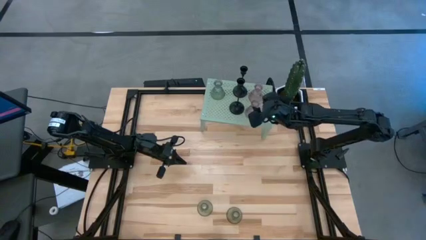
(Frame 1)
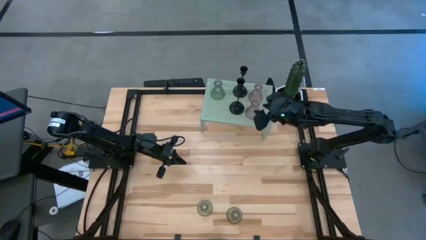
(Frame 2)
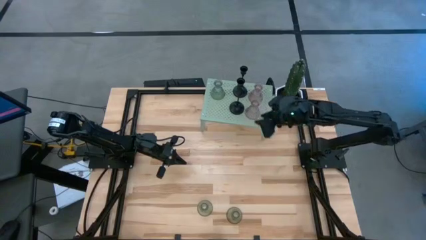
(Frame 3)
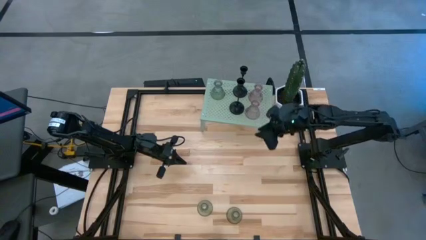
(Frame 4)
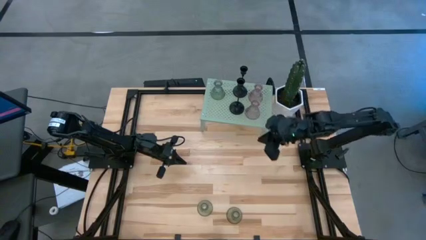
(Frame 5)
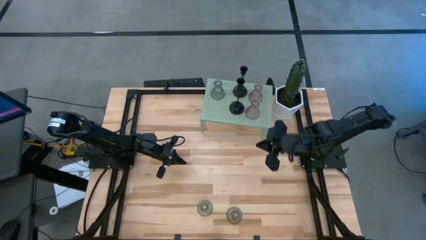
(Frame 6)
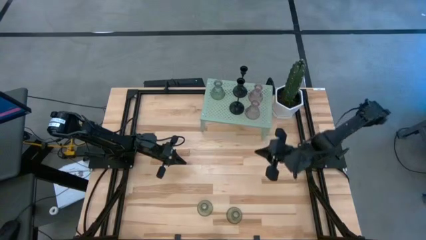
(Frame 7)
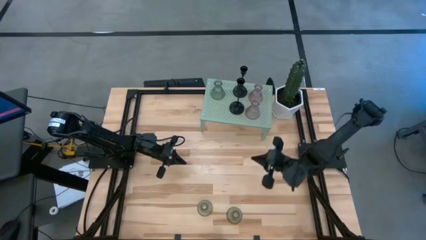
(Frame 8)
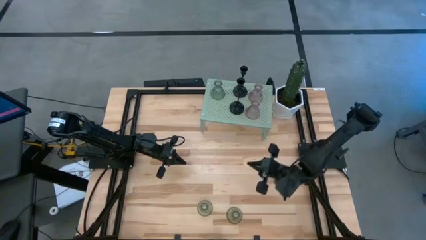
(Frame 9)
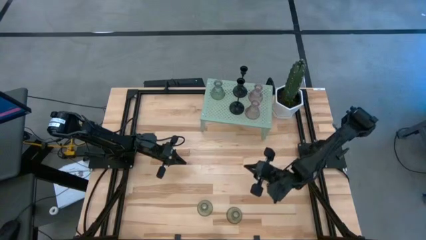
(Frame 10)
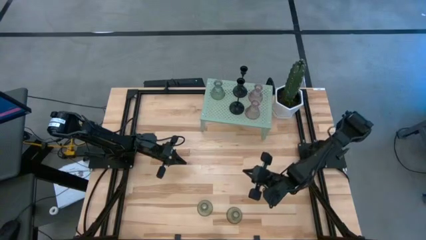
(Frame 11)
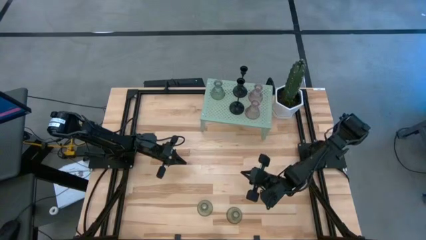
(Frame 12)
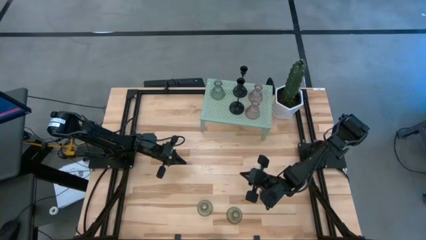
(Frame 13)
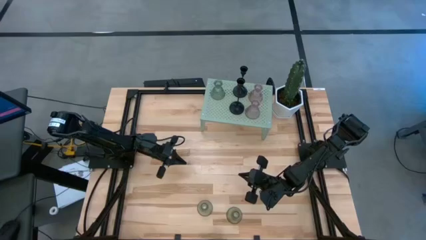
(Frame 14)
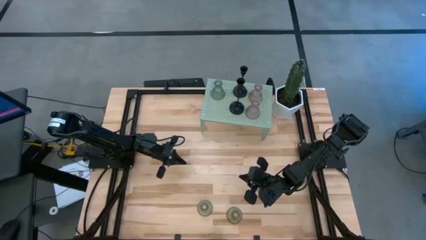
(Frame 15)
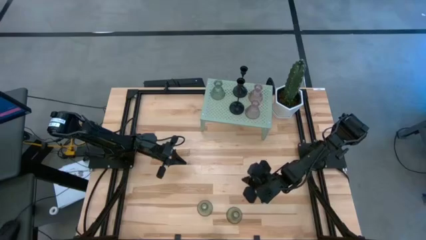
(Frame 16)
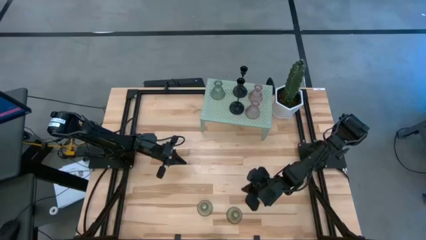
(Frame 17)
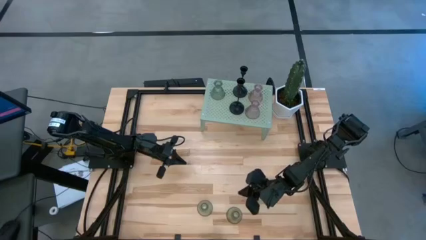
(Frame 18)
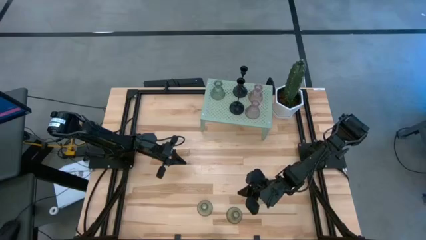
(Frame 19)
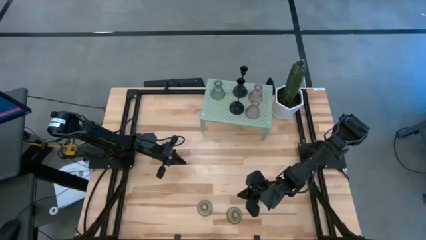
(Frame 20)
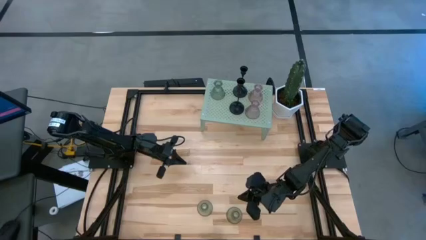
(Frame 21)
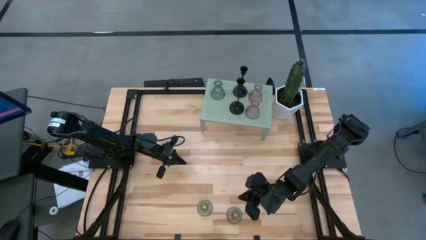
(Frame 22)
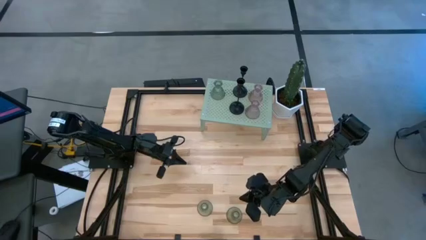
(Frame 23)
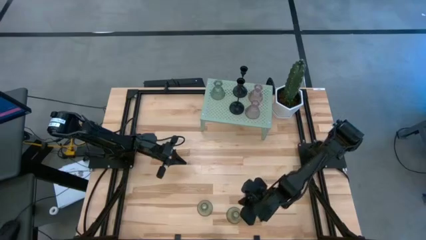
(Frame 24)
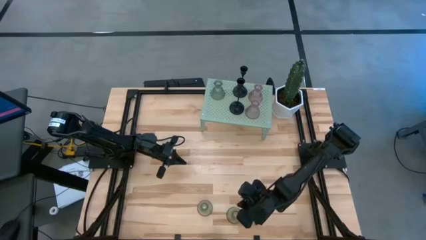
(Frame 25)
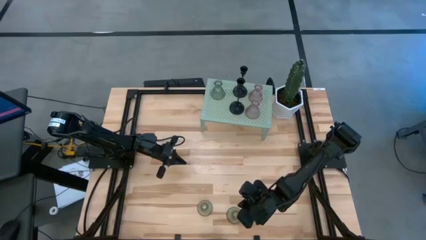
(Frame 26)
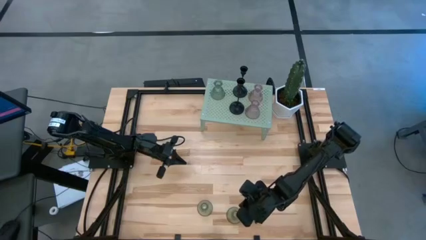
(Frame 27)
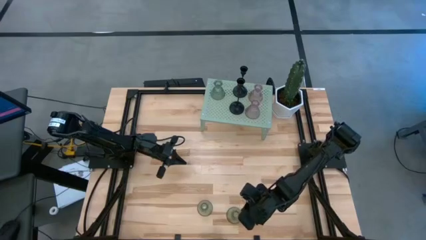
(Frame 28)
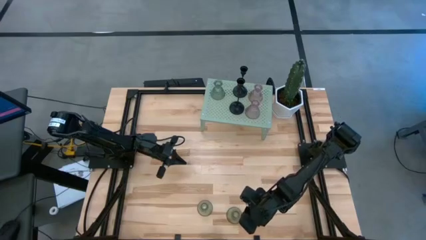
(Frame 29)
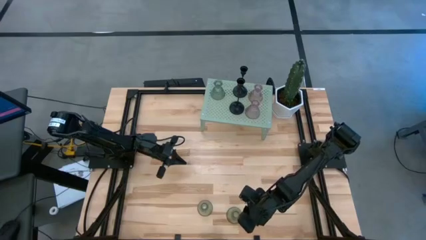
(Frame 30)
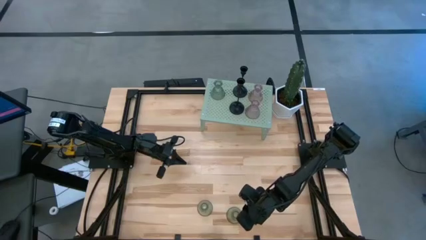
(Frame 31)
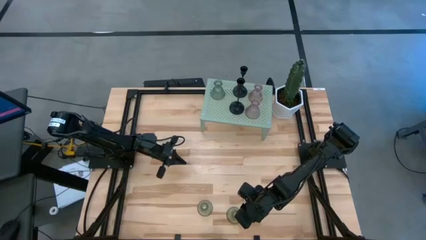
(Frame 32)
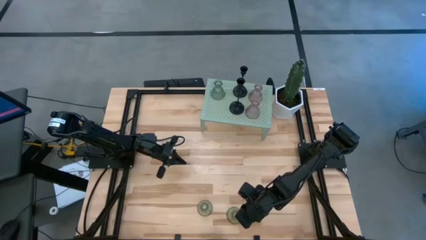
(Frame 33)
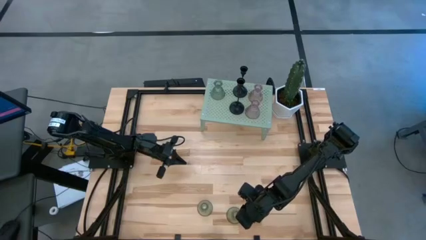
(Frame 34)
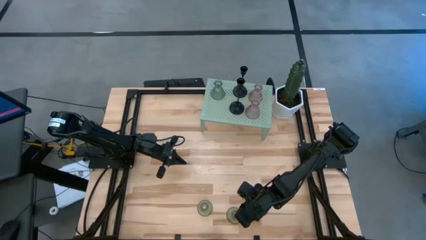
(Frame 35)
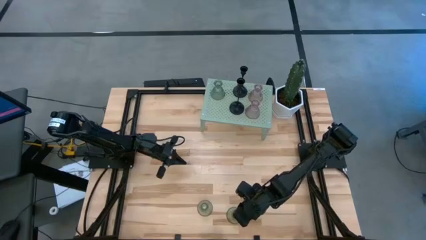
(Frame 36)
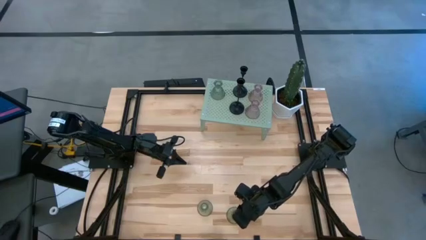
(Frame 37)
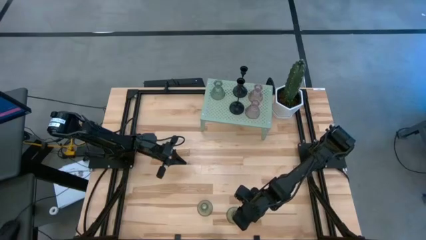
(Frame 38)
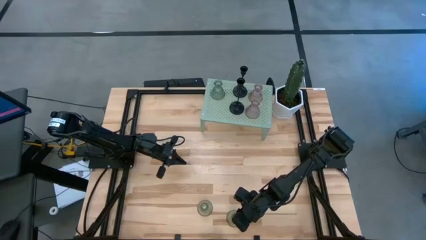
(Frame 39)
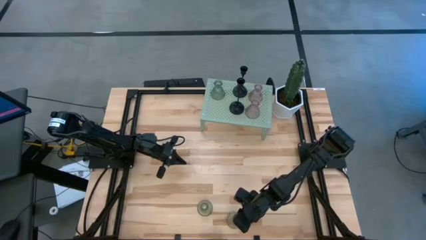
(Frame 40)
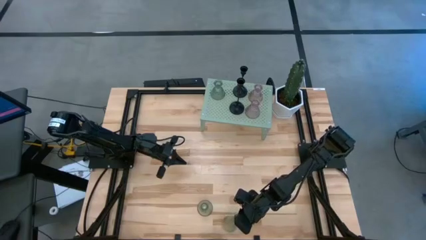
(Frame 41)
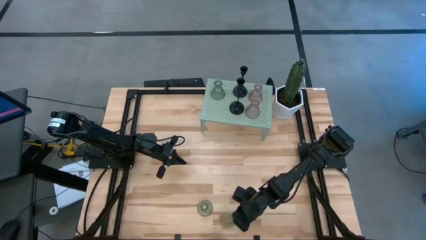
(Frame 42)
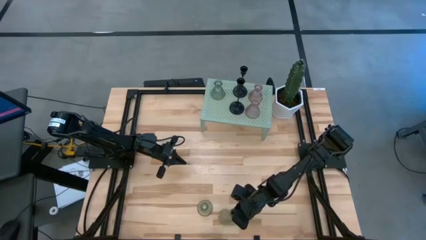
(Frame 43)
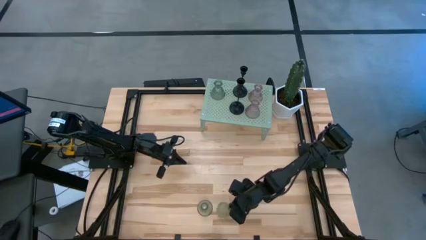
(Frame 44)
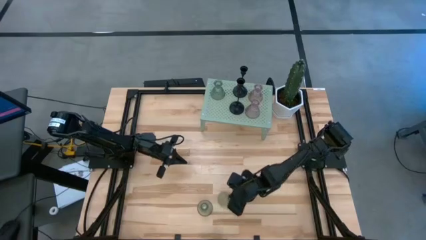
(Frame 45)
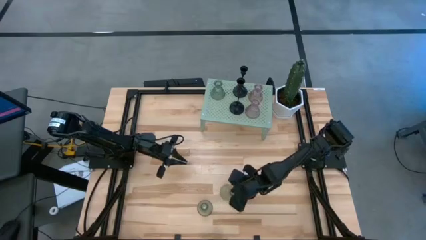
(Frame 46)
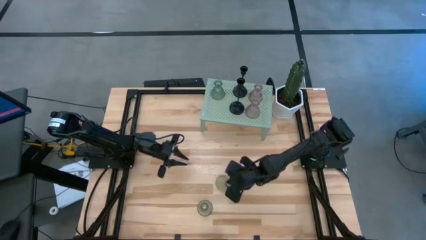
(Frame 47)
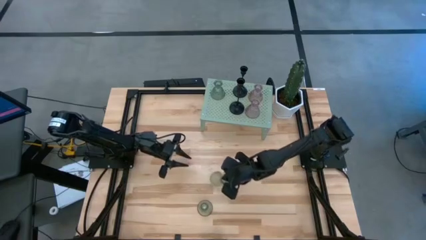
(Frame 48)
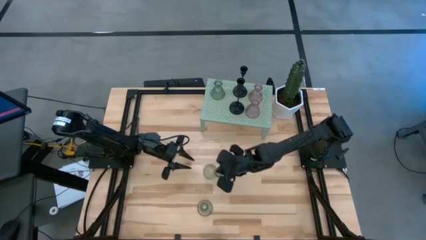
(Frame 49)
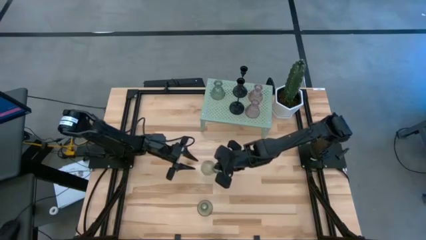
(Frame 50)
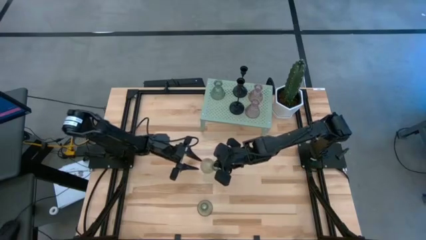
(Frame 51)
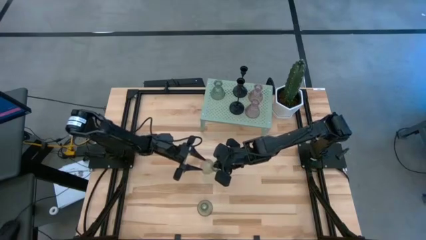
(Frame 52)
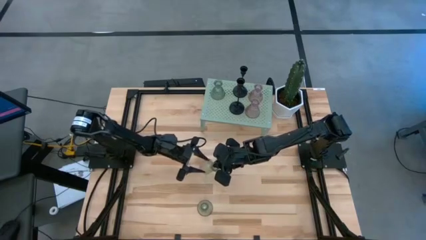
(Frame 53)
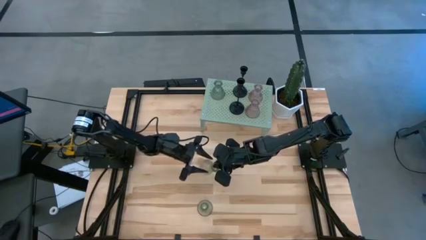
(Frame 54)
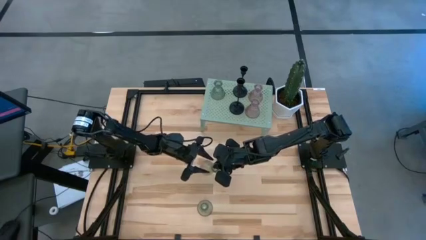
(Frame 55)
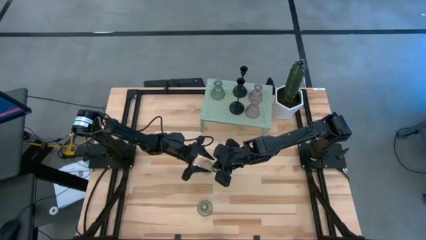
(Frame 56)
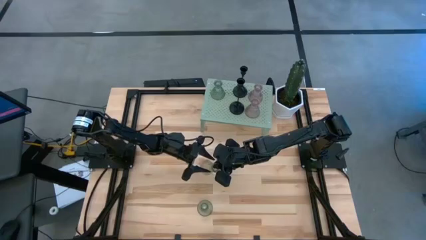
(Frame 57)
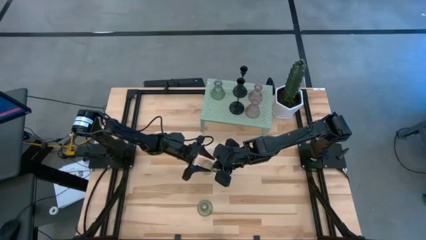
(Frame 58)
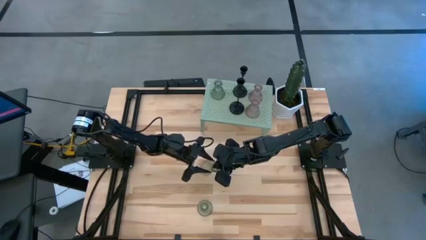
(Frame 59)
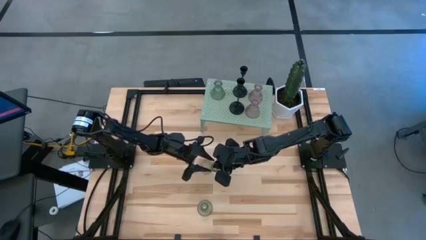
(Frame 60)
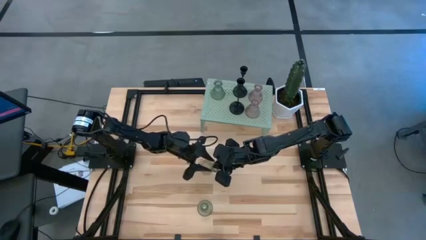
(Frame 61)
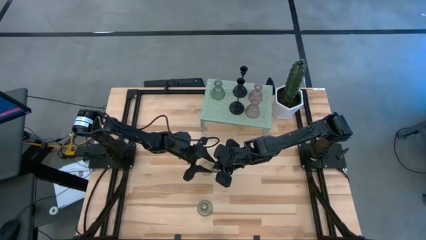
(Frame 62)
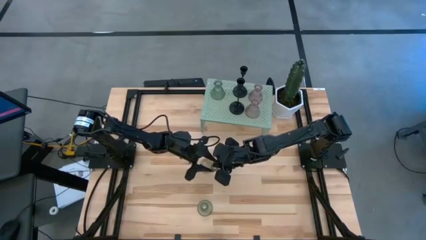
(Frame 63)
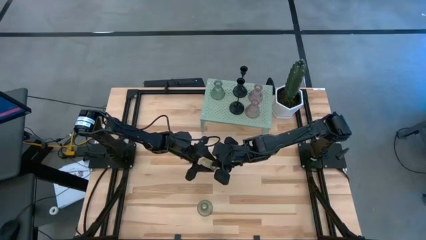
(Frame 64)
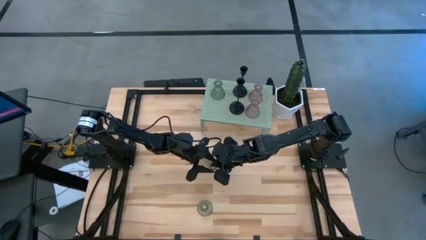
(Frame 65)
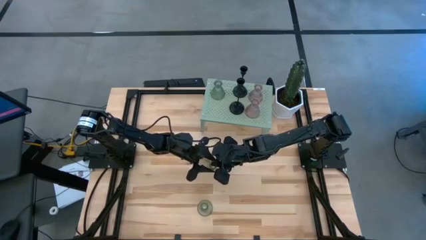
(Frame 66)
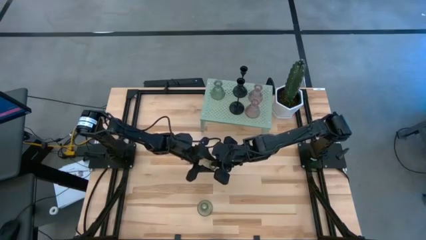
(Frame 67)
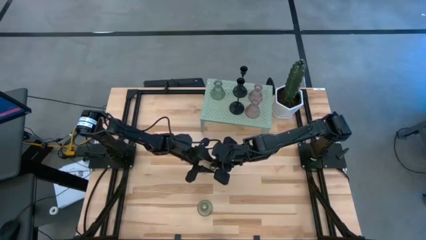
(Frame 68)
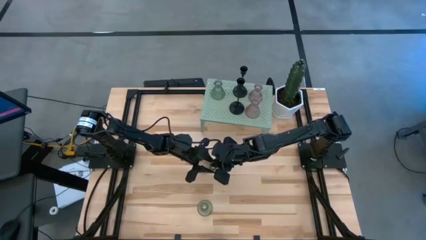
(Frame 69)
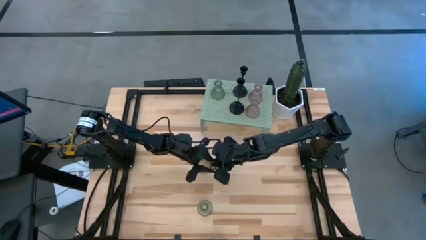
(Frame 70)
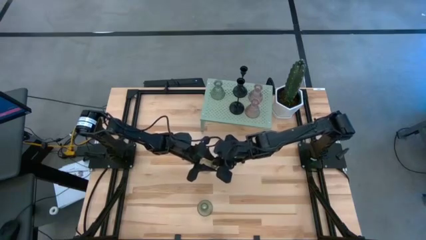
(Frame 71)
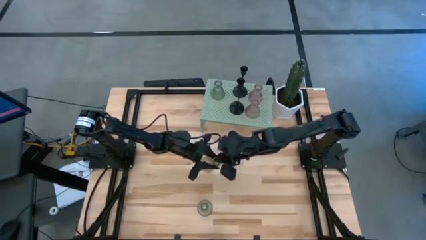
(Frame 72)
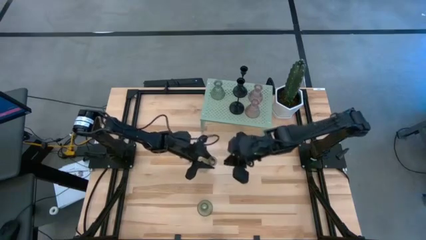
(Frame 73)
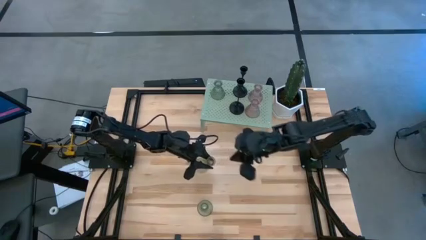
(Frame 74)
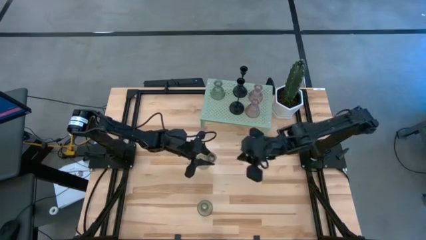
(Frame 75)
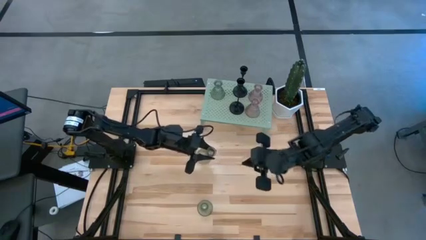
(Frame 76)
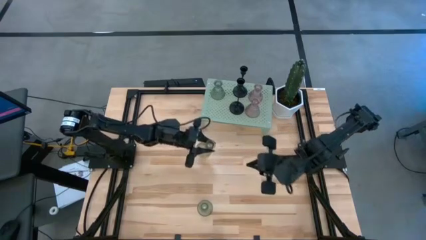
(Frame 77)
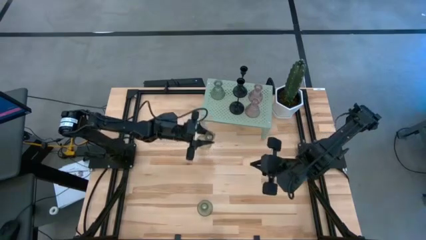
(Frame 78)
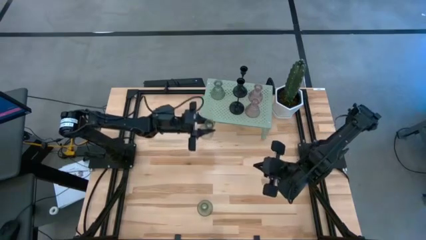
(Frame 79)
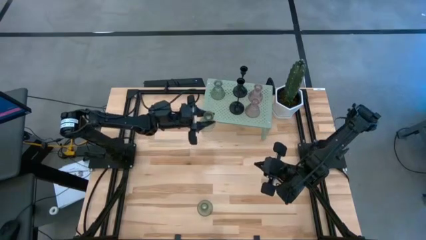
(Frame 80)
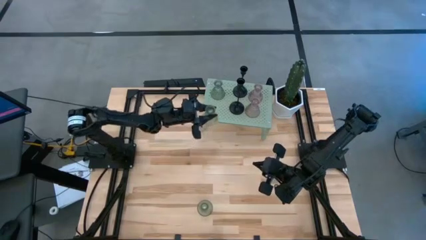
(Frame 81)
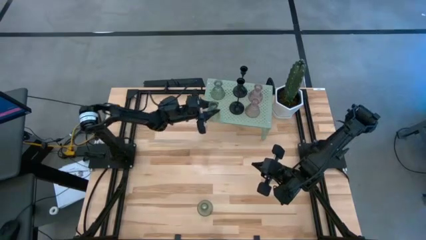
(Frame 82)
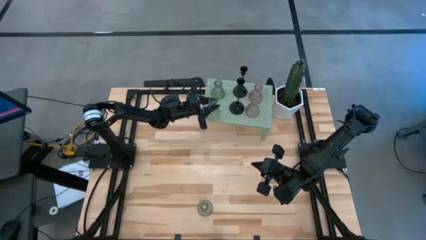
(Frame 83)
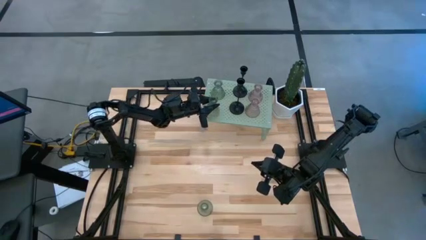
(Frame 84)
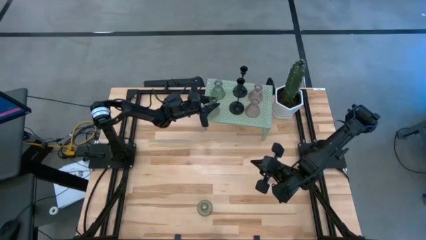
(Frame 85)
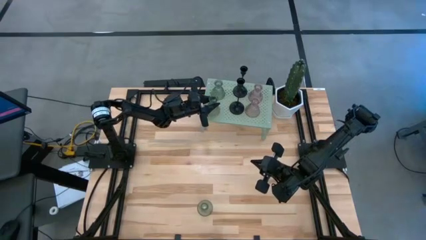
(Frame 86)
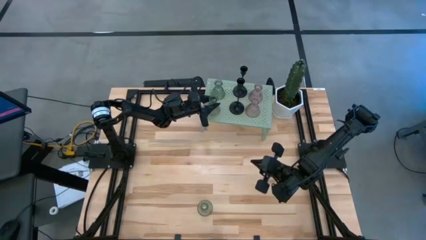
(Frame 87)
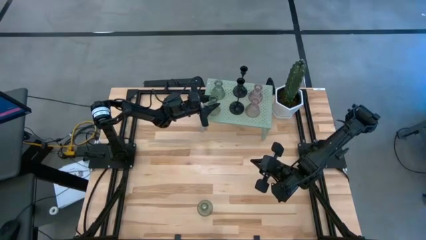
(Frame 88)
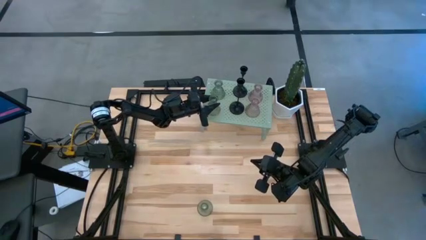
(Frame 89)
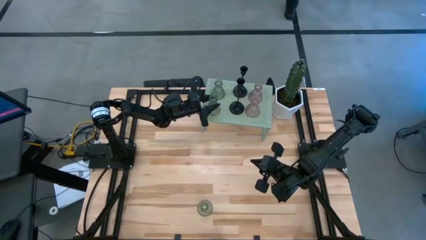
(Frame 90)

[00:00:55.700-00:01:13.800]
Task: Pick & Place candle stick holders
Put the right green glass candle holder on the shelf
